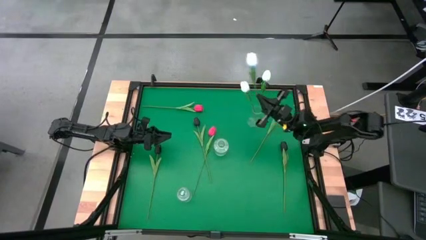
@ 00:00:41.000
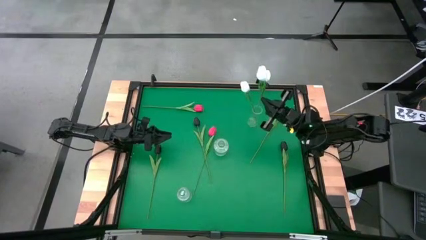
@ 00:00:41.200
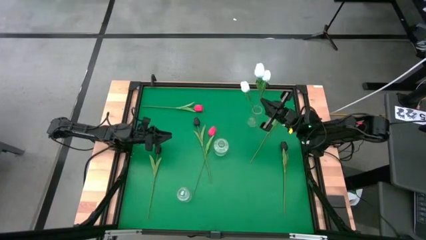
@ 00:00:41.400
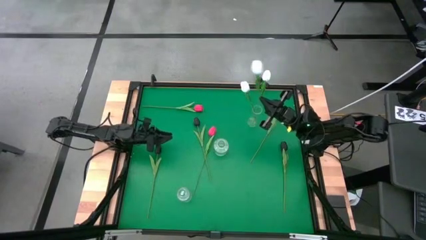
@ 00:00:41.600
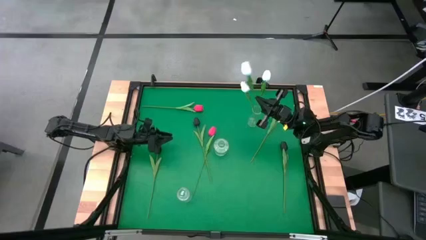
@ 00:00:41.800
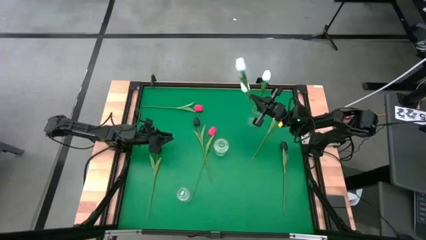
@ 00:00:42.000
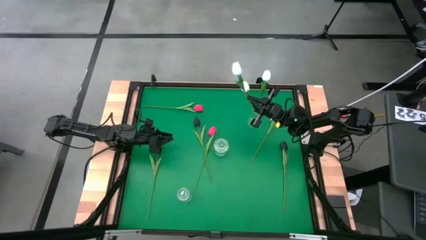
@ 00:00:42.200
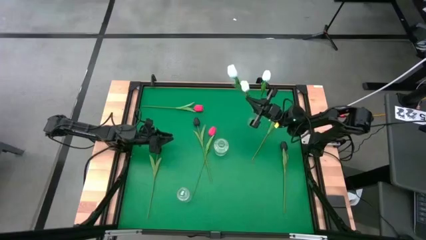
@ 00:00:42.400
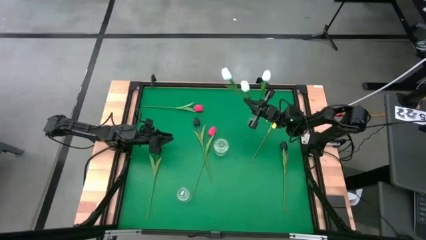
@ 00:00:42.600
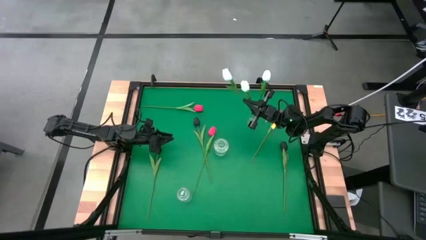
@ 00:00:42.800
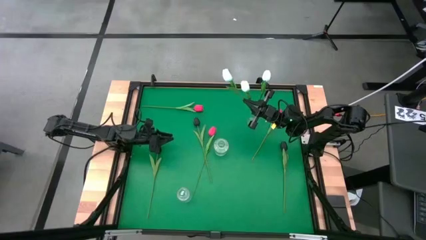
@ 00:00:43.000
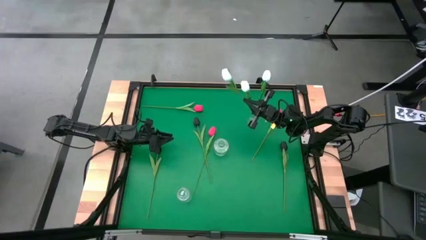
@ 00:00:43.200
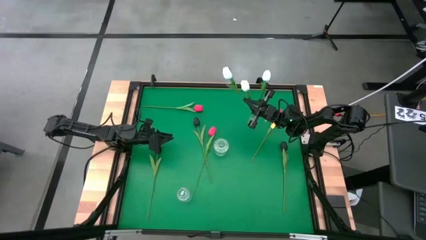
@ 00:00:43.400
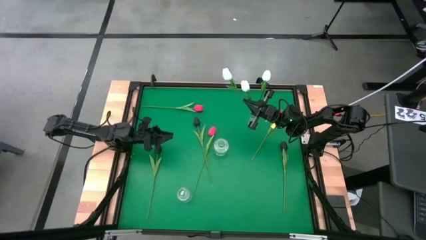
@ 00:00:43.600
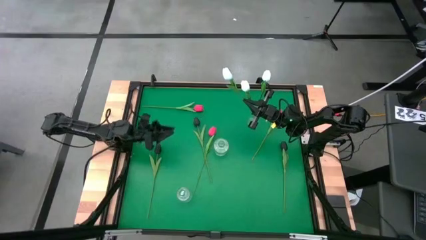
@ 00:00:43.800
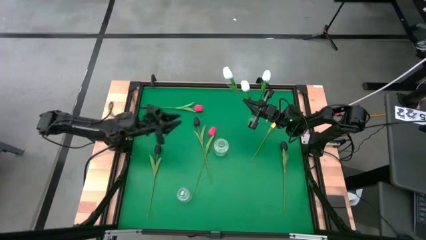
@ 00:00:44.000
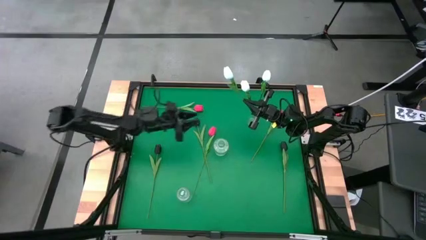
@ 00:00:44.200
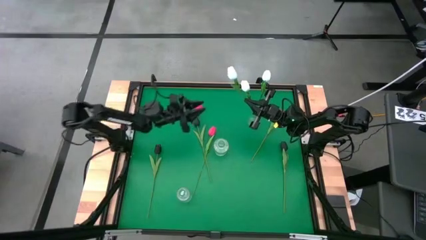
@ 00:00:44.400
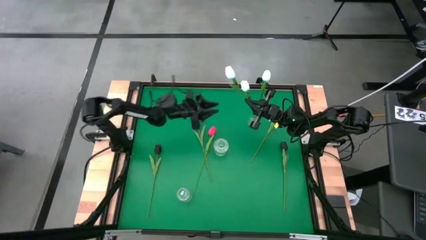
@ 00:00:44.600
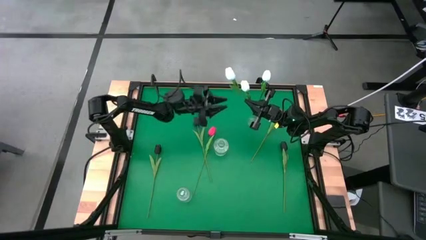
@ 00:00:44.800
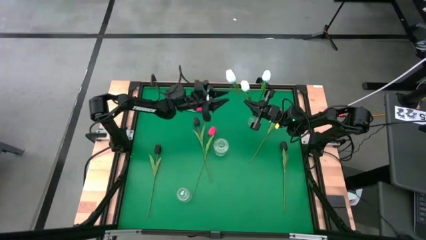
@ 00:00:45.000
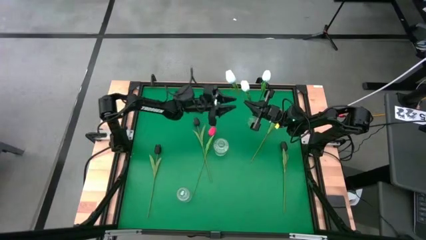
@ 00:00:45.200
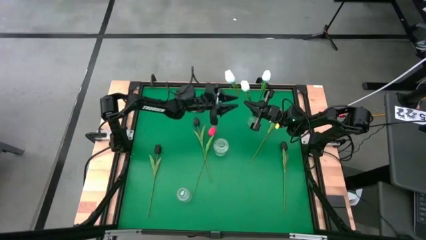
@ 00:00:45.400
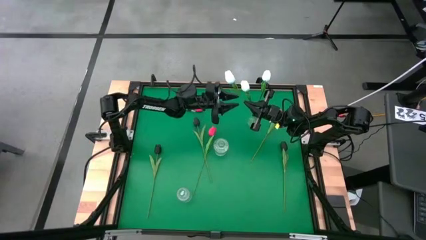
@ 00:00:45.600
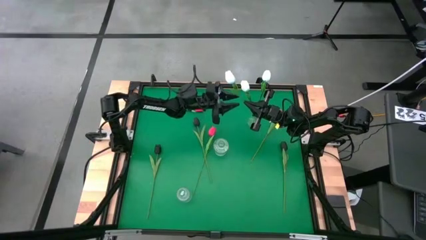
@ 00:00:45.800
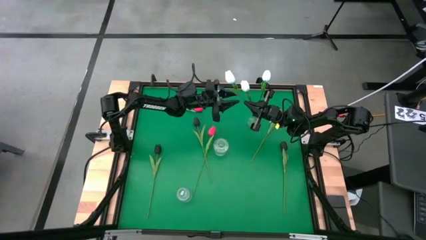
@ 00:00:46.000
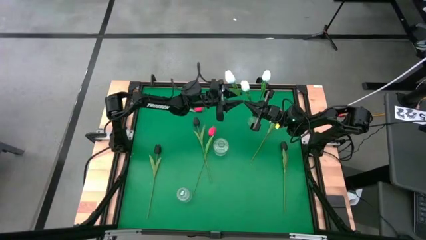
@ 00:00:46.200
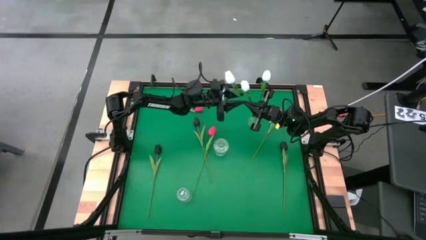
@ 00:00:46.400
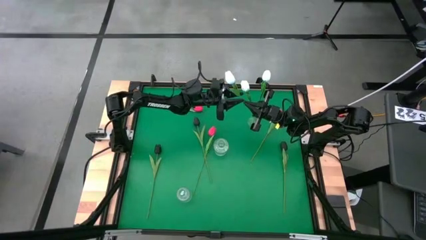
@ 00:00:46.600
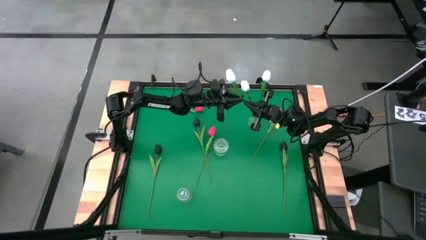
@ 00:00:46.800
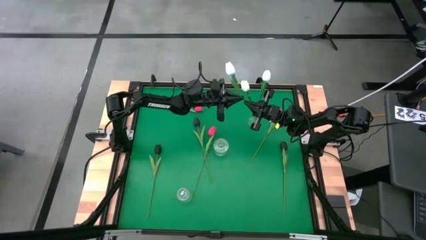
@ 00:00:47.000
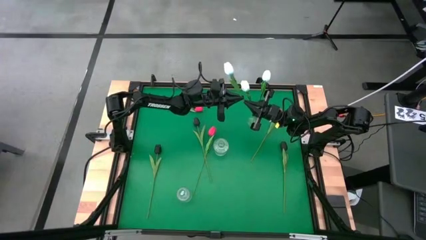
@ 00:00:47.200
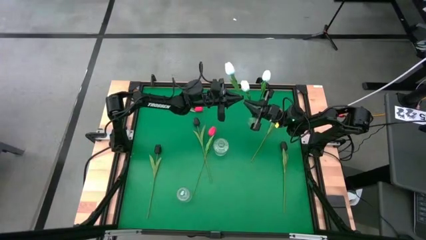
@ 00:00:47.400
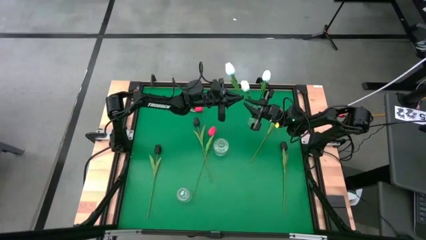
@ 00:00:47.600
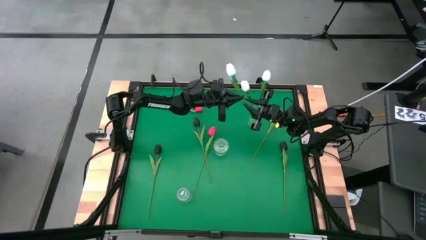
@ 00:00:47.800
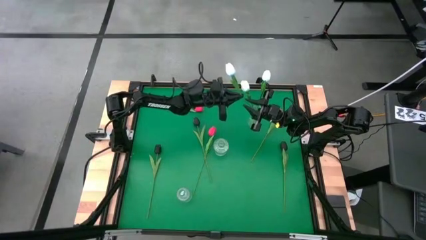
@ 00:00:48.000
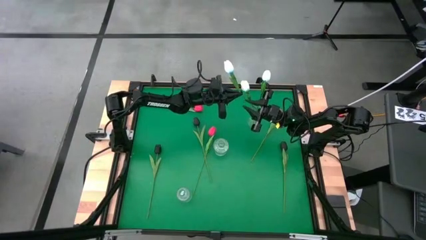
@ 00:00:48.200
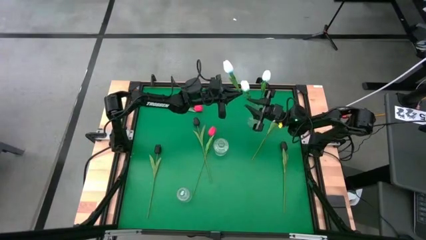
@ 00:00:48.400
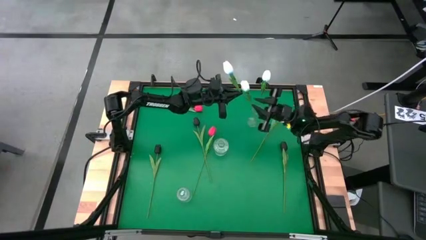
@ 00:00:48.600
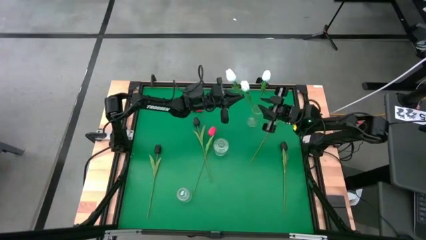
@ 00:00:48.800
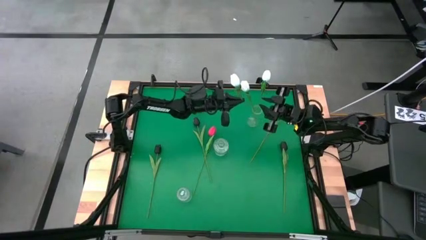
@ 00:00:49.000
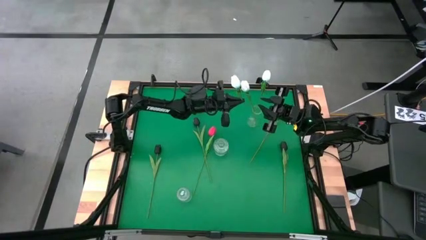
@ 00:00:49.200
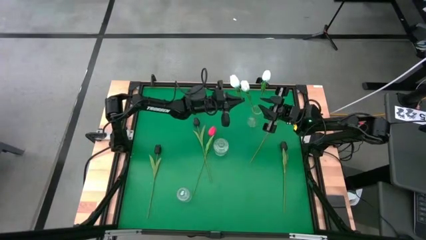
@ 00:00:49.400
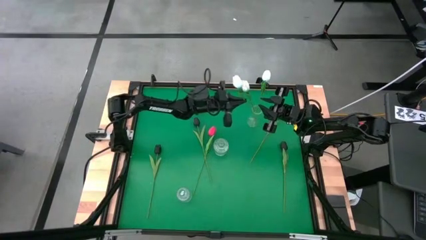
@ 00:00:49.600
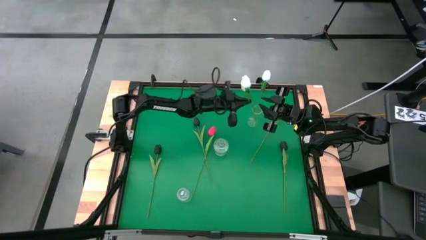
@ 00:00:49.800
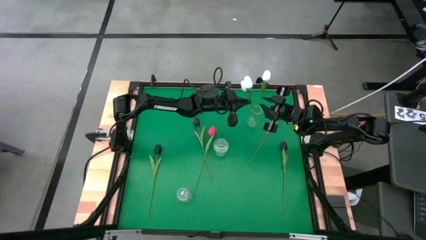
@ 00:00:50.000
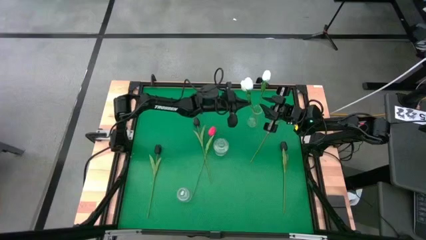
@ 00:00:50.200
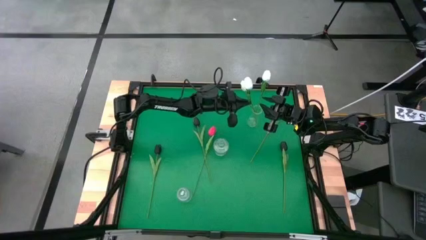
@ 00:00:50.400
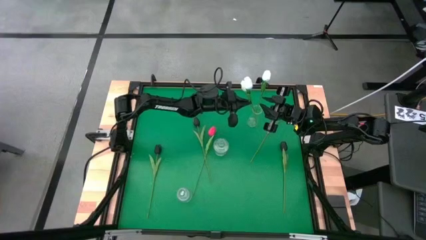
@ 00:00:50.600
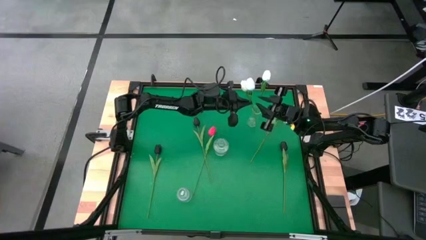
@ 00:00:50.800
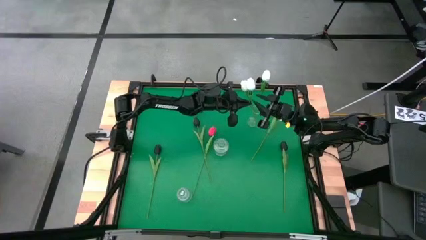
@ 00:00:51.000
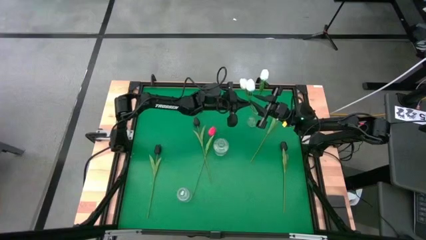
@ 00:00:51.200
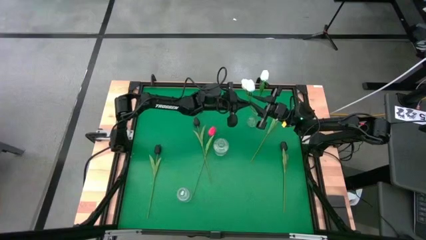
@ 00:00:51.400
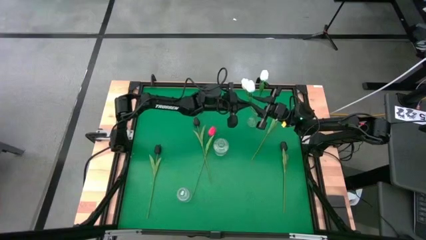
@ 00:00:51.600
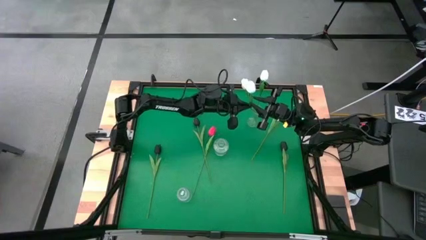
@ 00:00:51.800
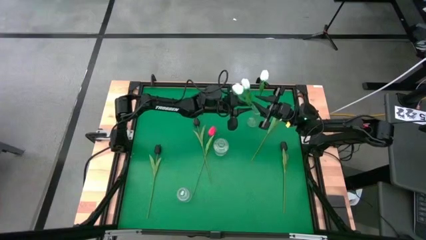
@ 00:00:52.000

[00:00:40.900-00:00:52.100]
Task: Sort flowers into vase by color
Put the white tulip into the top transparent flower vase

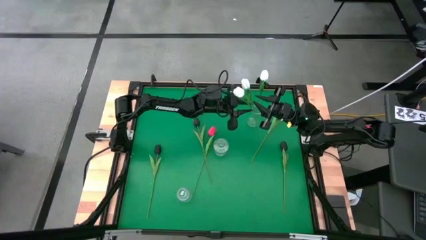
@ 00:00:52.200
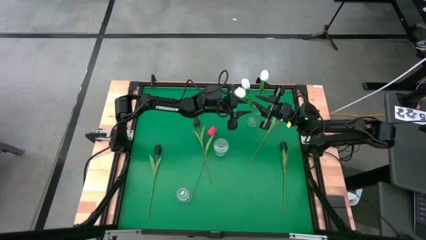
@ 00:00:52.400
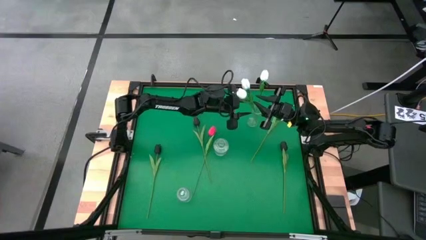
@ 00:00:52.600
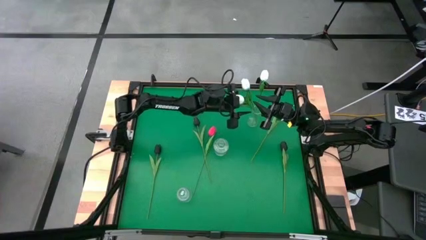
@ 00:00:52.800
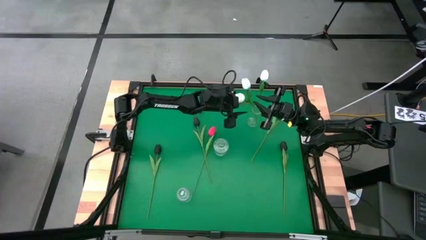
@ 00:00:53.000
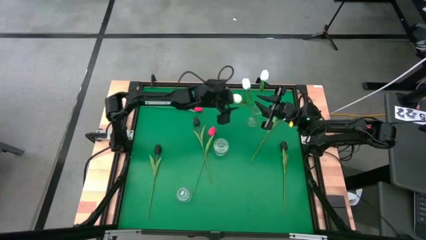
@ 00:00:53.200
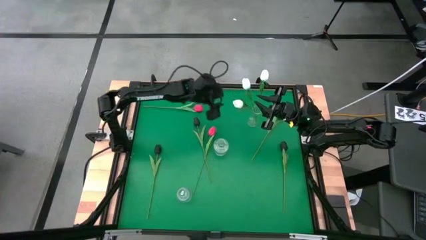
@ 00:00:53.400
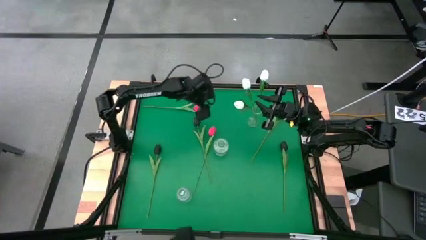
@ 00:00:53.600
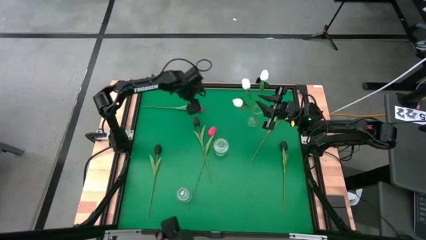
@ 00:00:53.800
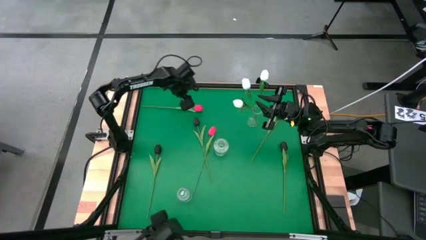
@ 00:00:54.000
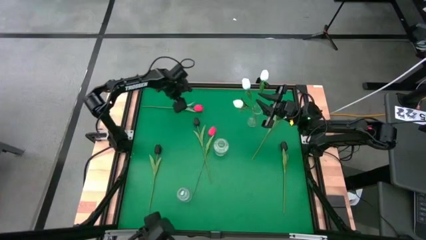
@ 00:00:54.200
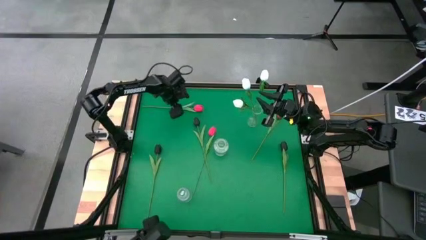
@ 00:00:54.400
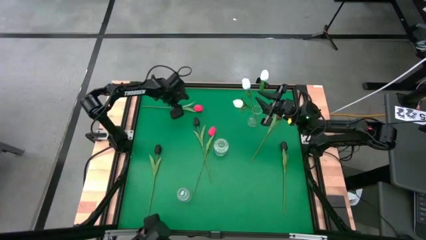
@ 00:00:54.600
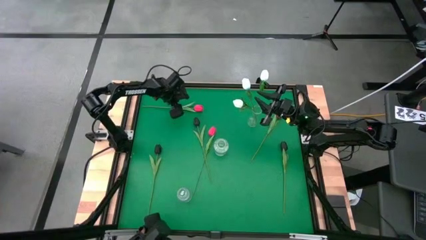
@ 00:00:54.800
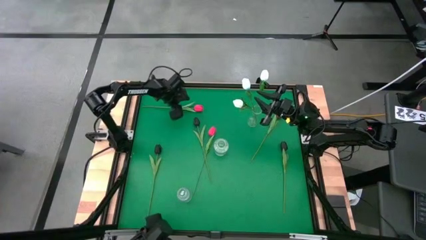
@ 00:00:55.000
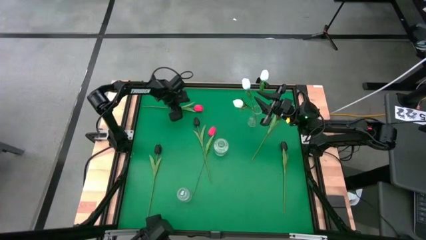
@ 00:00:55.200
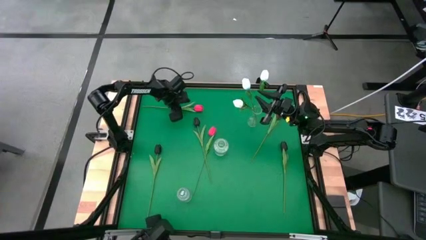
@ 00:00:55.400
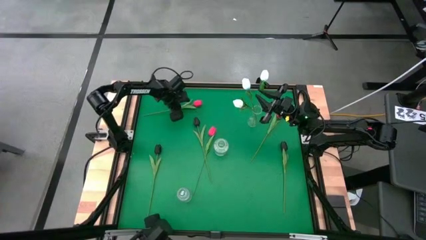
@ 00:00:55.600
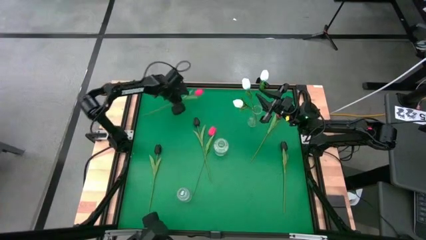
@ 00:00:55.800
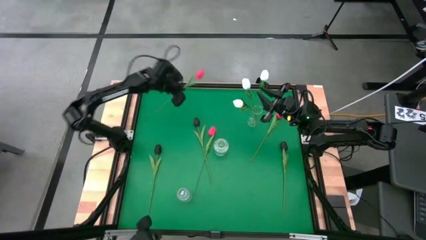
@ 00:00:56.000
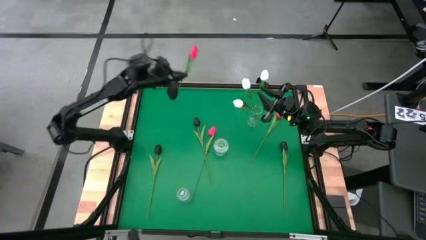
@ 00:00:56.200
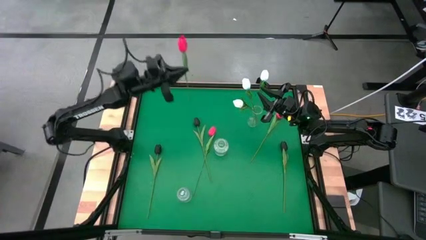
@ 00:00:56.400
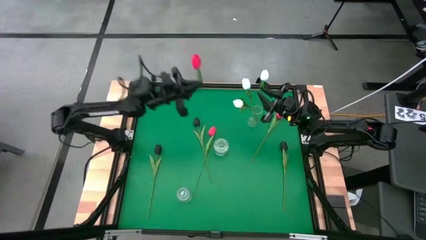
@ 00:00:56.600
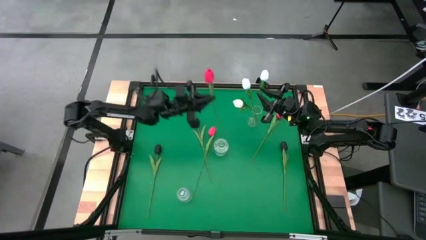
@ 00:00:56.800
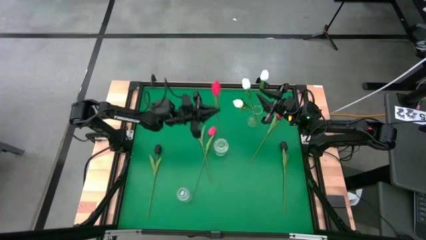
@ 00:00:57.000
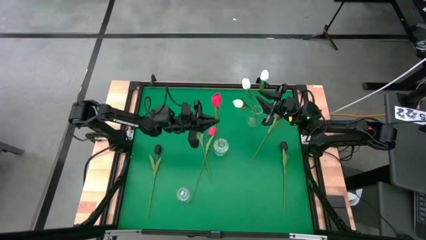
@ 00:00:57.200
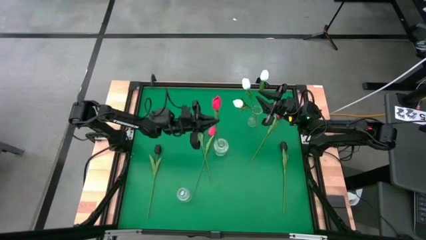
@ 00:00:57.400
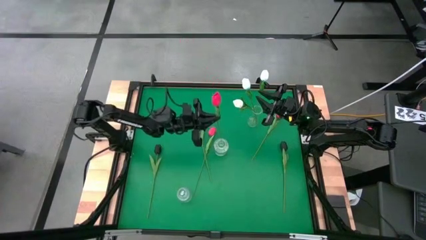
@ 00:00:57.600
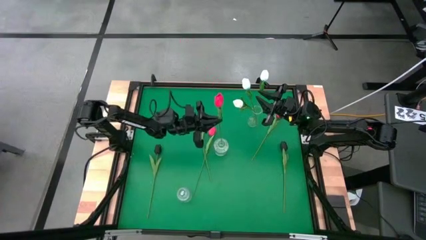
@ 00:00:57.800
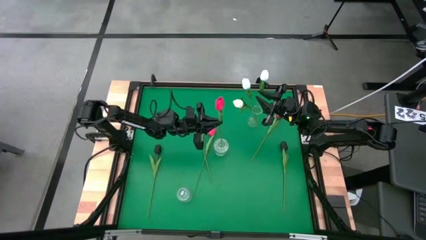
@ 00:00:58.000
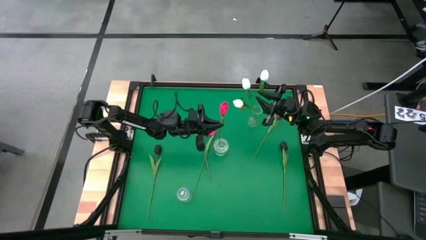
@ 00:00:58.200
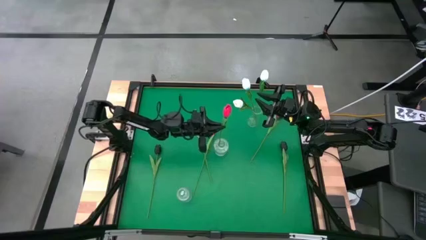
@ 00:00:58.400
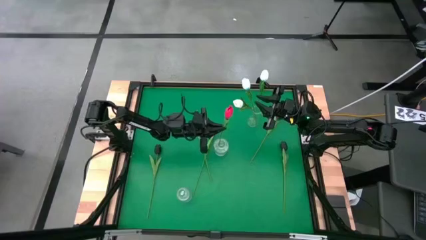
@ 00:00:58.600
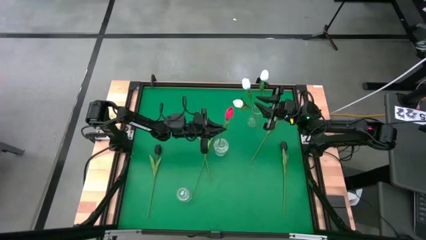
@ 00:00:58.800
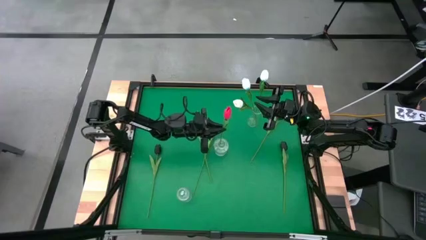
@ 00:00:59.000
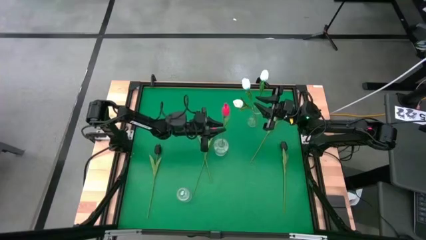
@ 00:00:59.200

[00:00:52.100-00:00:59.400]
Put the top left red tulip into the middle transparent flower vase
